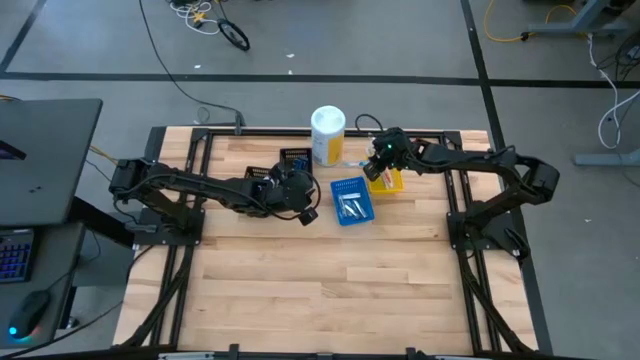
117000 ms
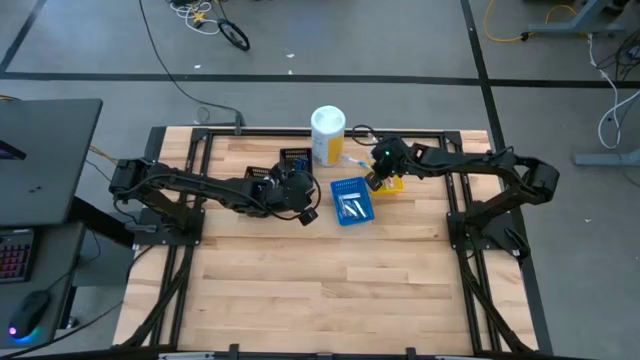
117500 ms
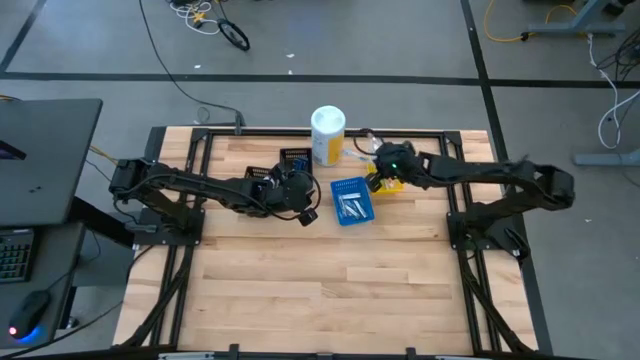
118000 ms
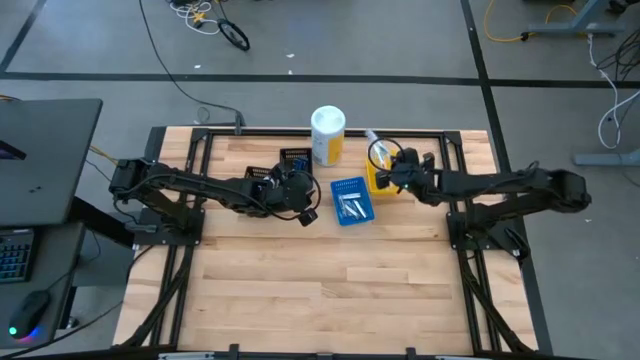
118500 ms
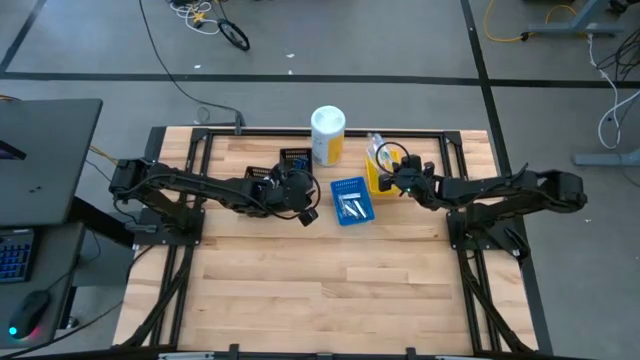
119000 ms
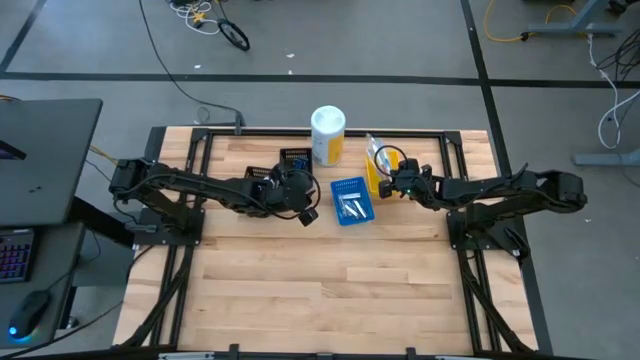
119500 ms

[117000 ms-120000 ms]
Task: Pick & Place Travel size toiletries
Put the blue toothbrush into the yellow bin

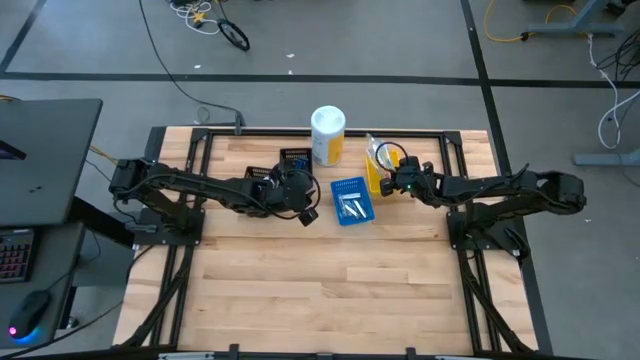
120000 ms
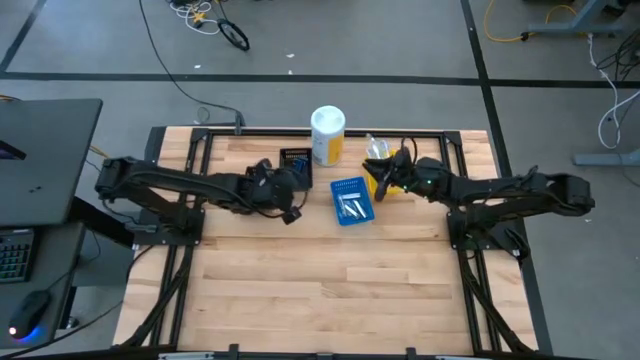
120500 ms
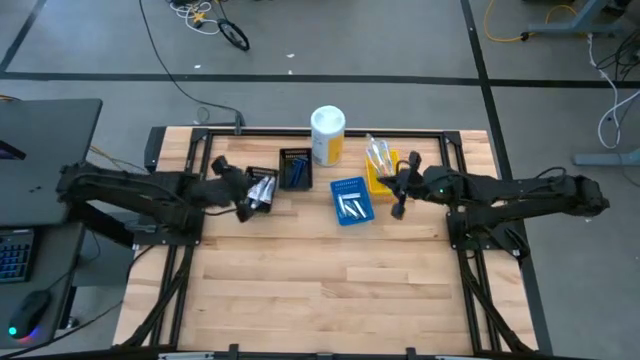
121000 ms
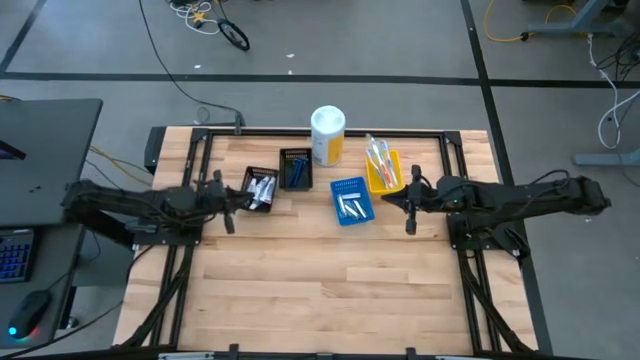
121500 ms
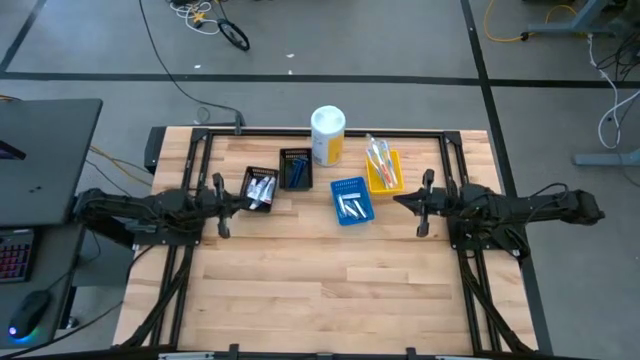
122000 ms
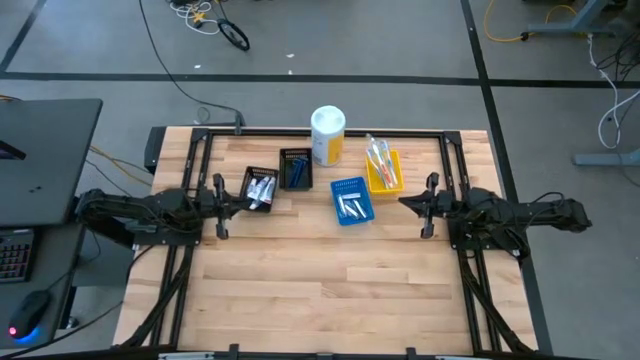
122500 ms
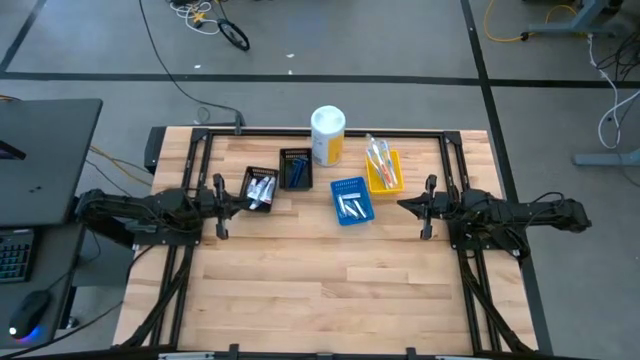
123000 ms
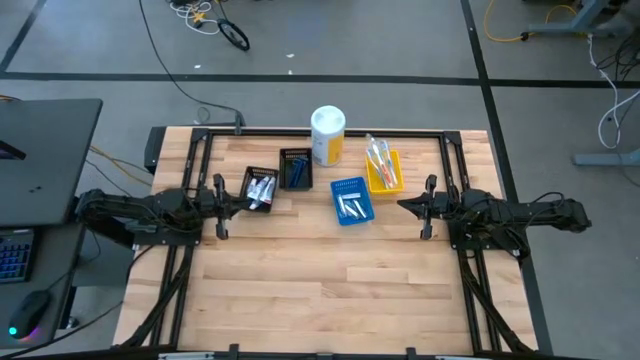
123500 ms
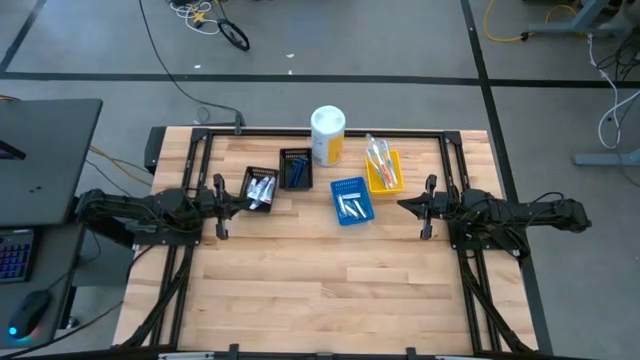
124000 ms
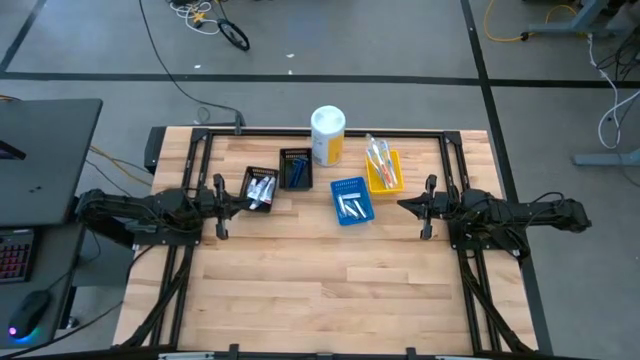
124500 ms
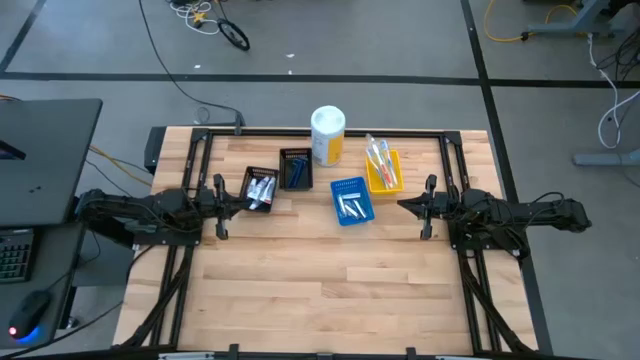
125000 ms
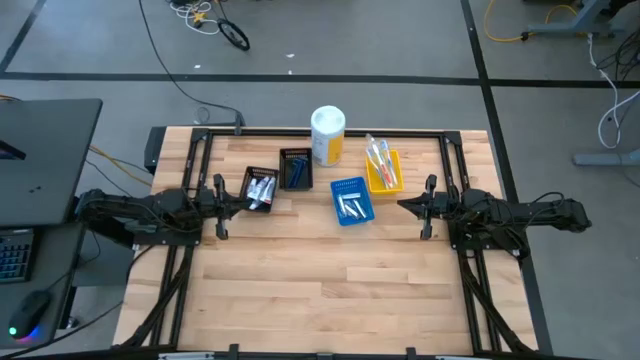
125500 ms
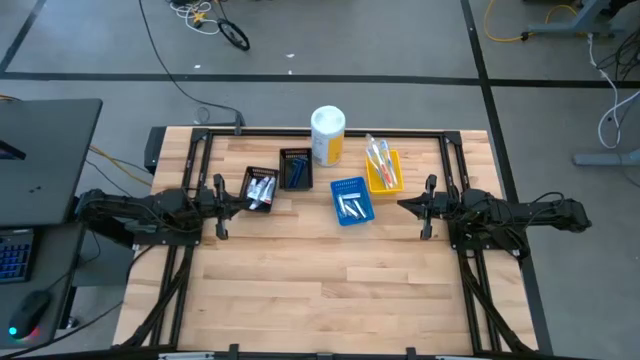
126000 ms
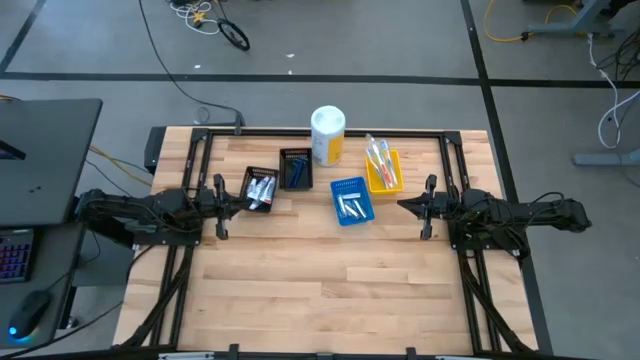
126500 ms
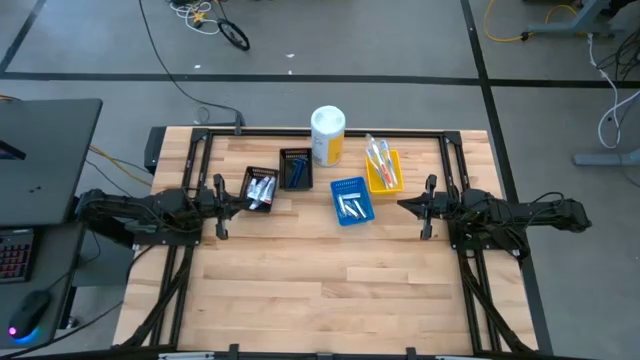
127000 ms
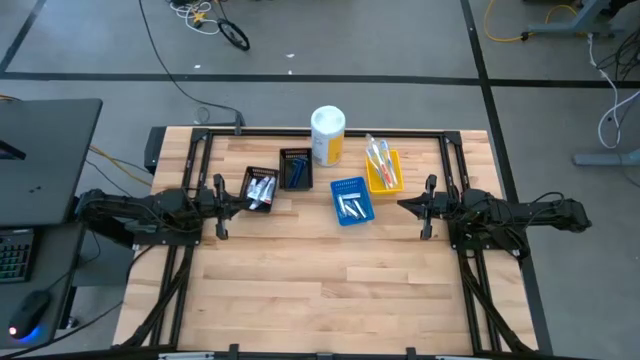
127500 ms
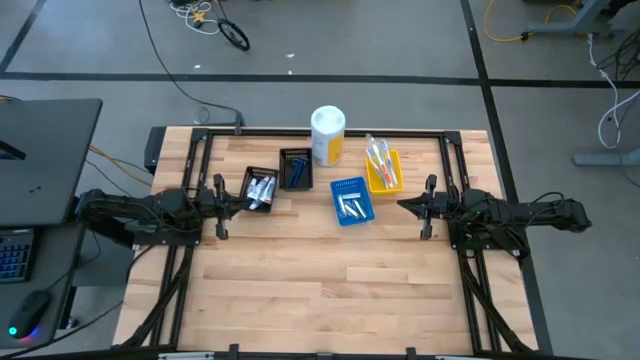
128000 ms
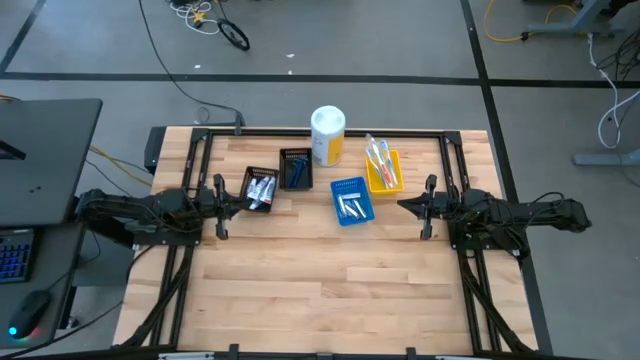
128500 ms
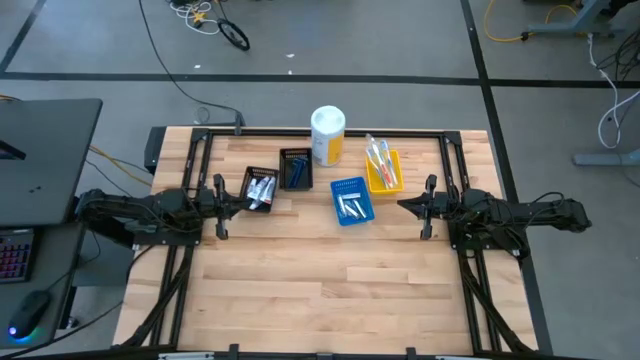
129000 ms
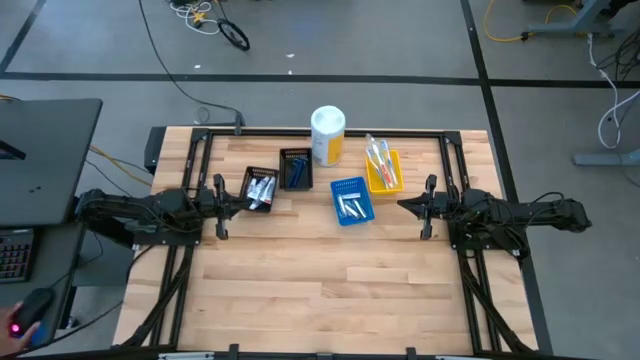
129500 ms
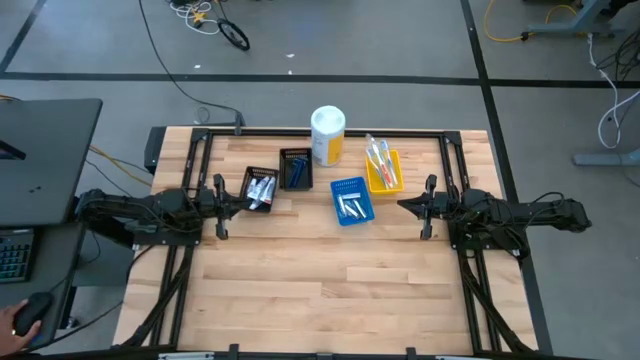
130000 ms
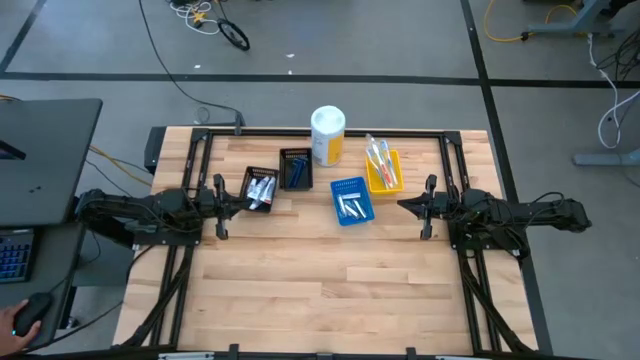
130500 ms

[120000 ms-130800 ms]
Return to Home Position
